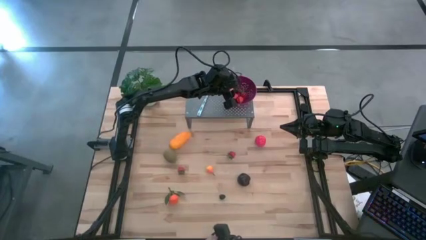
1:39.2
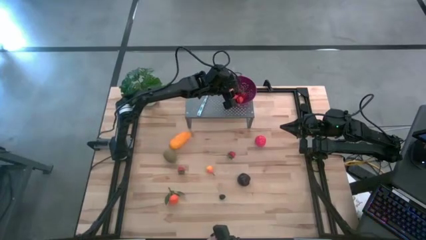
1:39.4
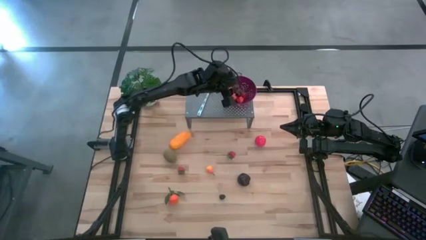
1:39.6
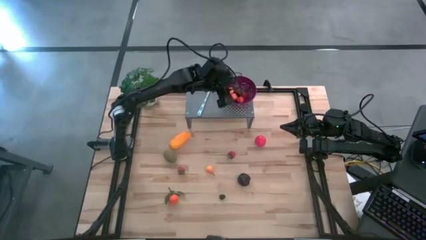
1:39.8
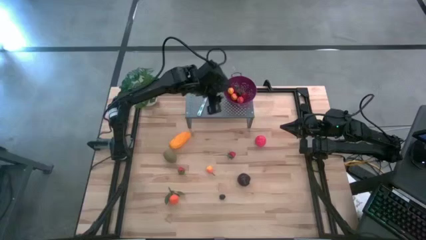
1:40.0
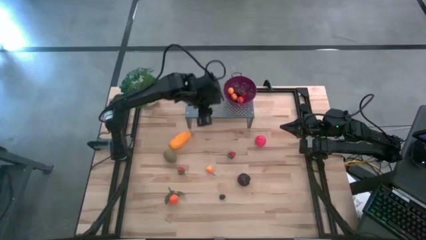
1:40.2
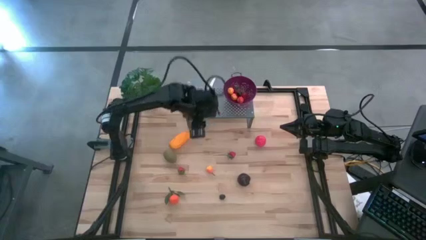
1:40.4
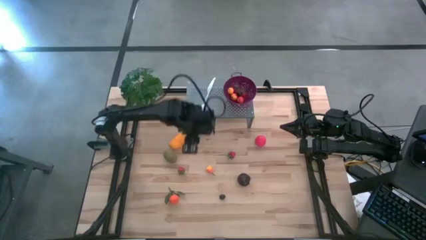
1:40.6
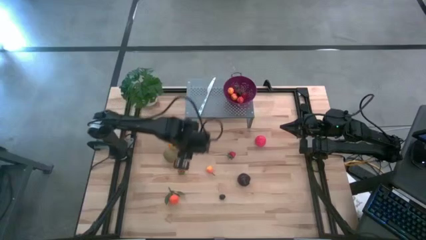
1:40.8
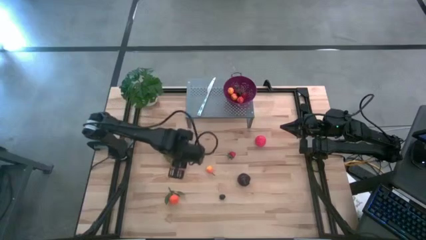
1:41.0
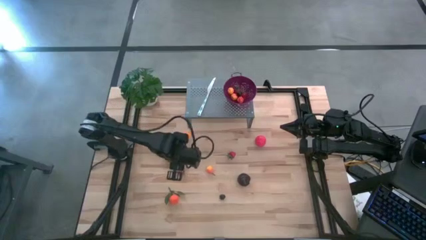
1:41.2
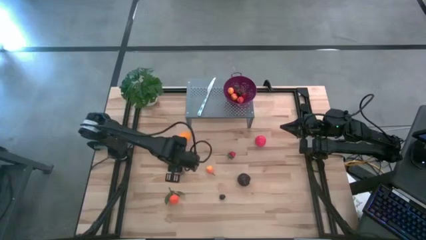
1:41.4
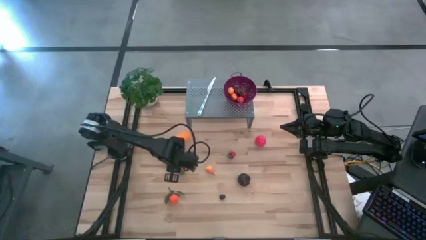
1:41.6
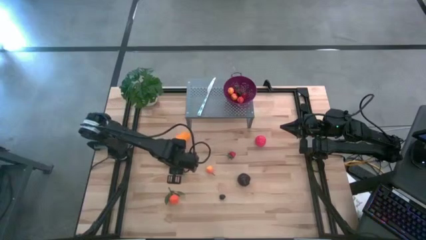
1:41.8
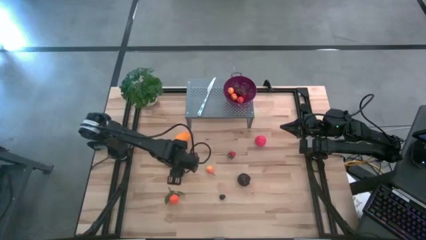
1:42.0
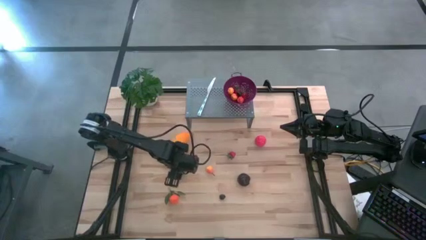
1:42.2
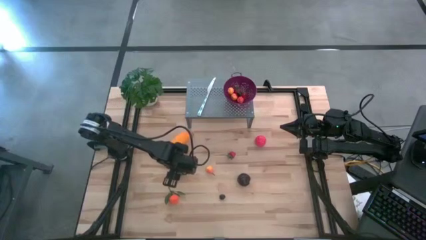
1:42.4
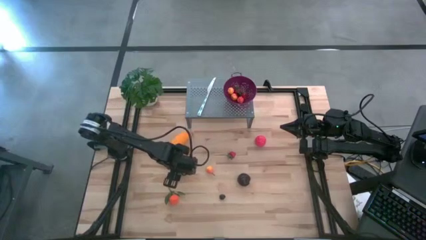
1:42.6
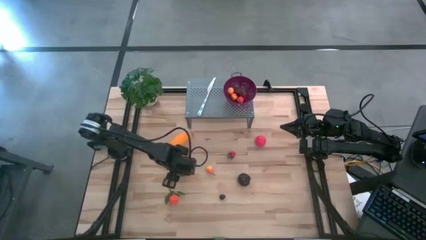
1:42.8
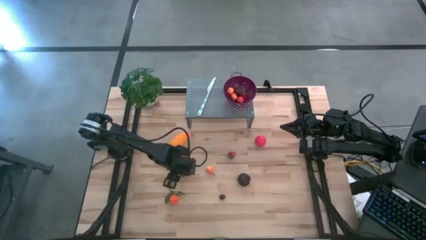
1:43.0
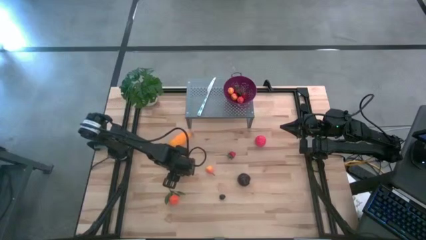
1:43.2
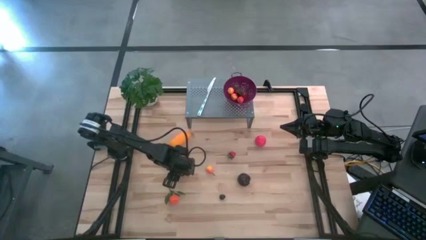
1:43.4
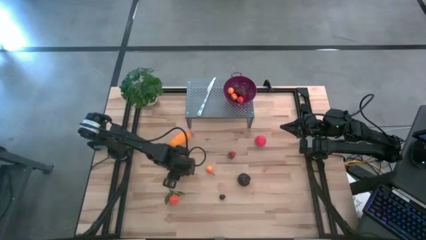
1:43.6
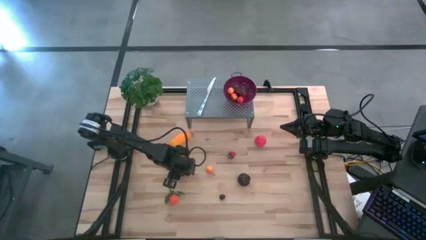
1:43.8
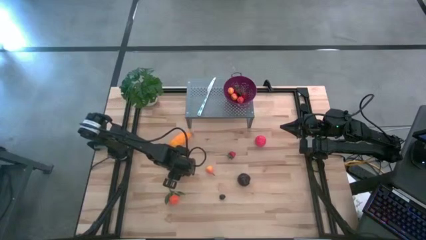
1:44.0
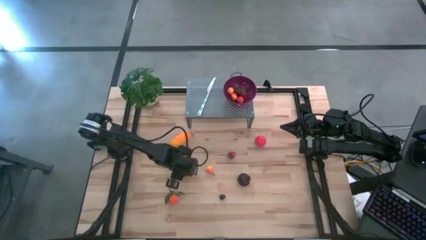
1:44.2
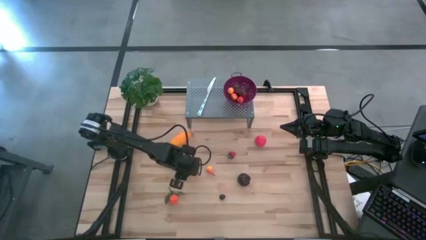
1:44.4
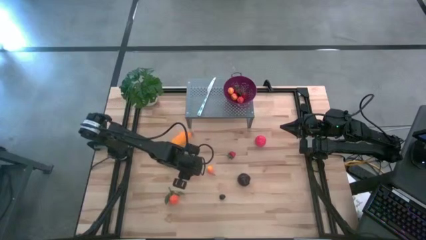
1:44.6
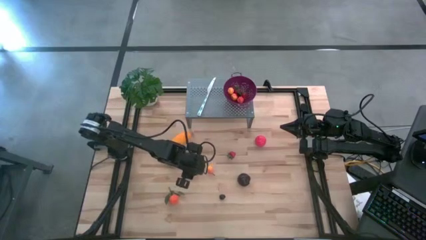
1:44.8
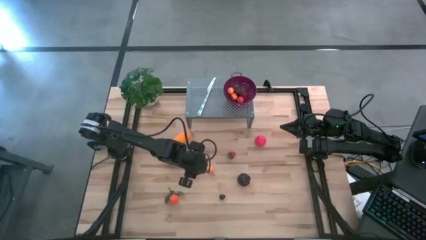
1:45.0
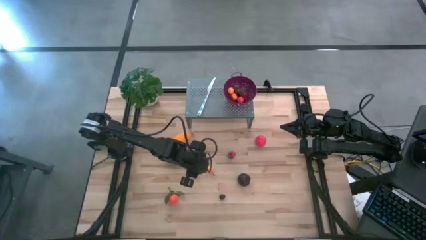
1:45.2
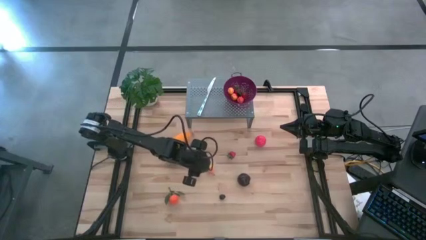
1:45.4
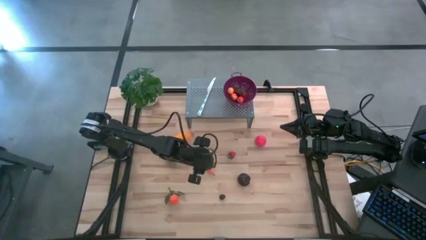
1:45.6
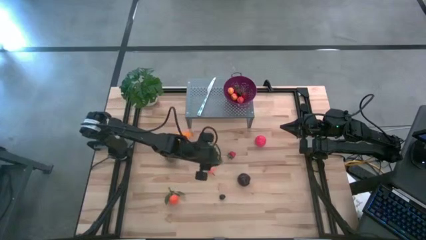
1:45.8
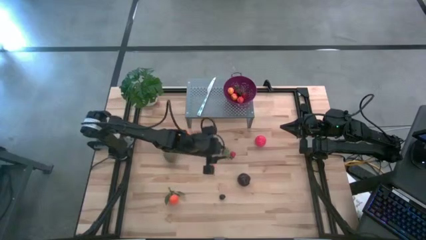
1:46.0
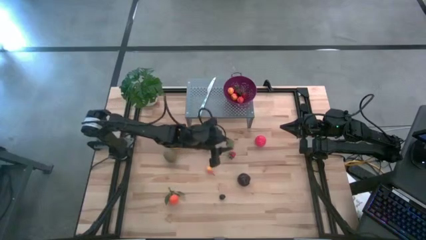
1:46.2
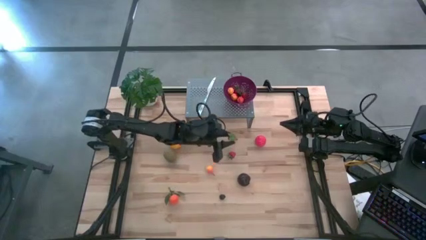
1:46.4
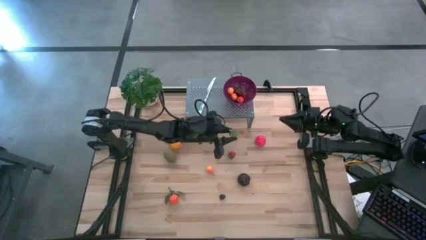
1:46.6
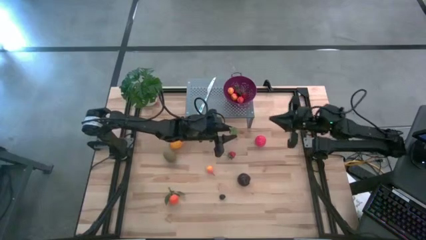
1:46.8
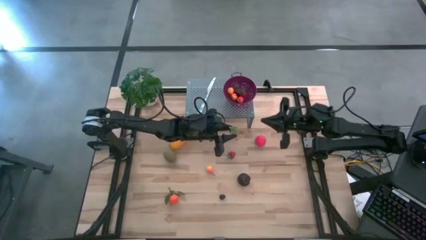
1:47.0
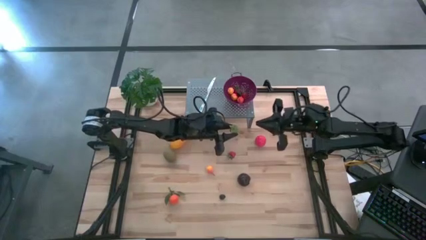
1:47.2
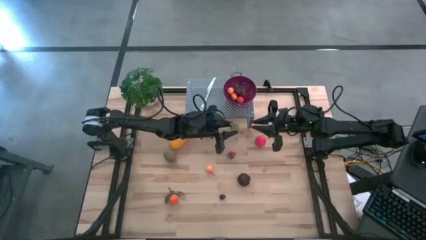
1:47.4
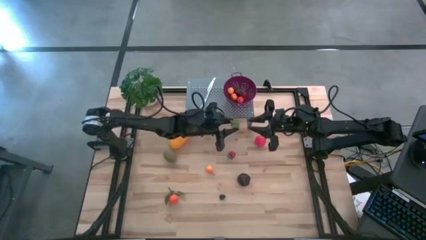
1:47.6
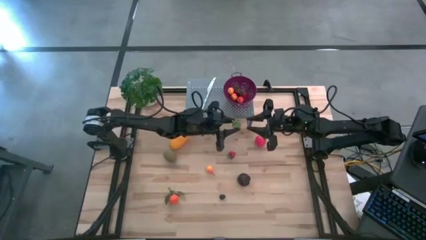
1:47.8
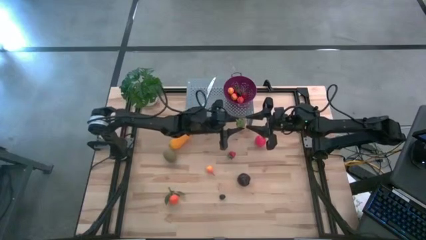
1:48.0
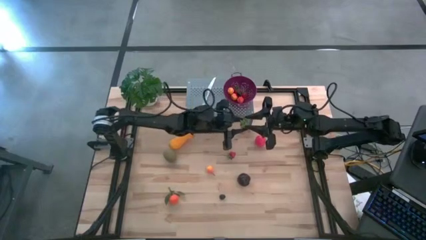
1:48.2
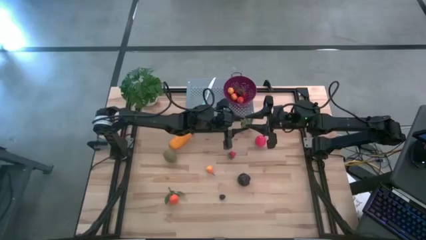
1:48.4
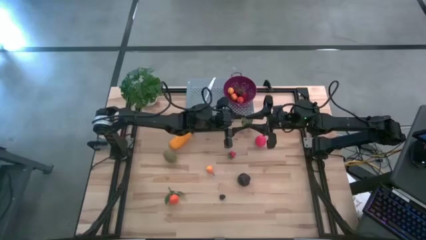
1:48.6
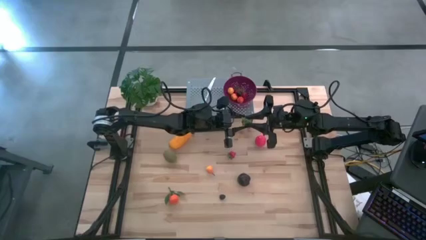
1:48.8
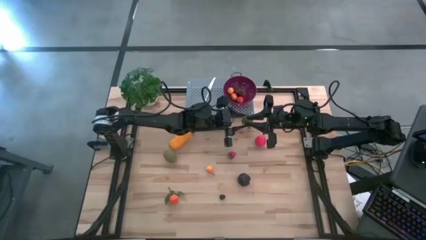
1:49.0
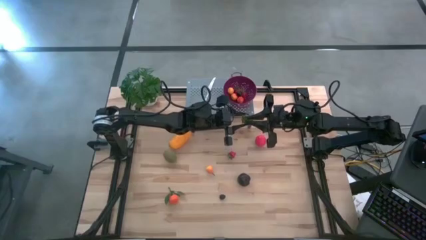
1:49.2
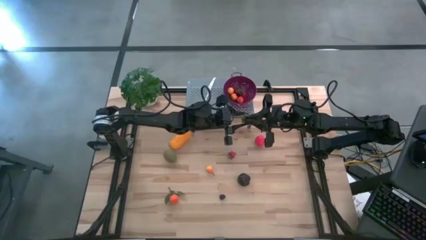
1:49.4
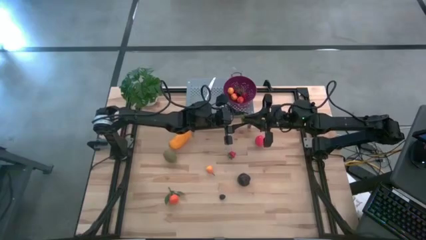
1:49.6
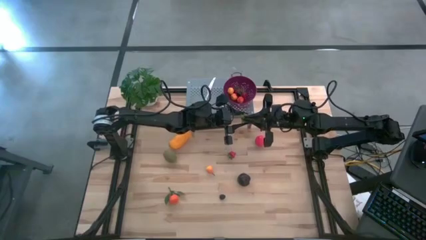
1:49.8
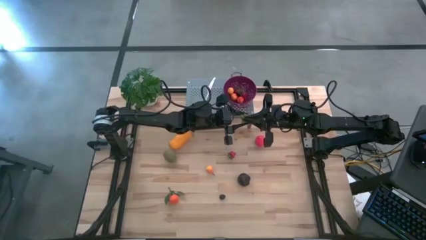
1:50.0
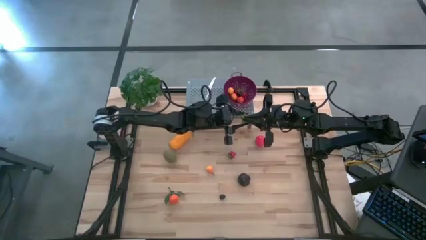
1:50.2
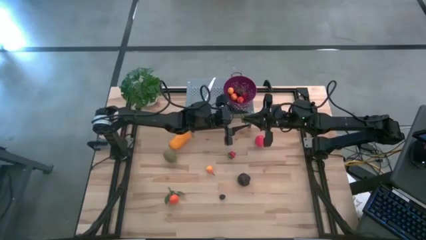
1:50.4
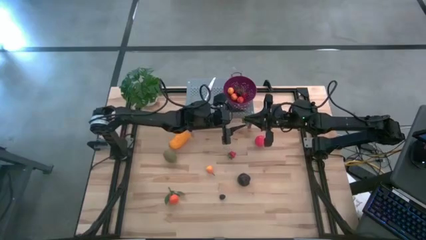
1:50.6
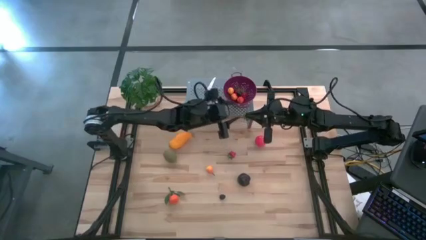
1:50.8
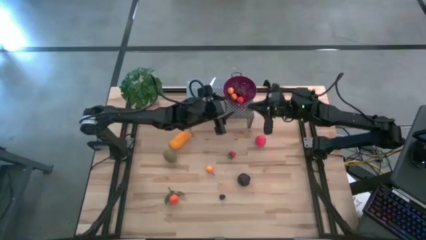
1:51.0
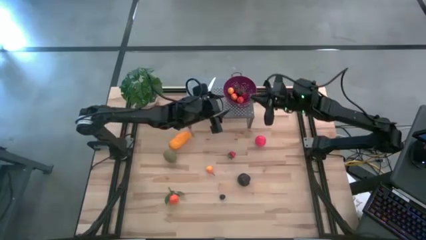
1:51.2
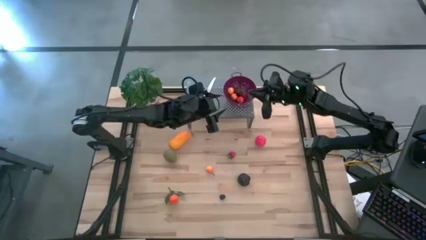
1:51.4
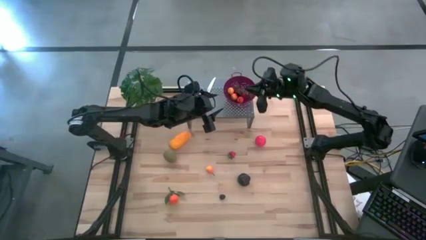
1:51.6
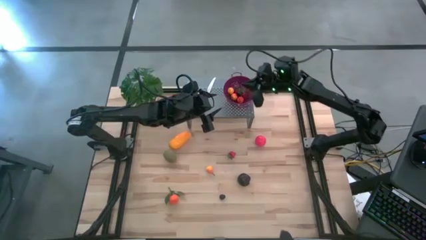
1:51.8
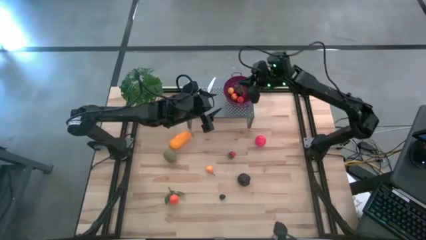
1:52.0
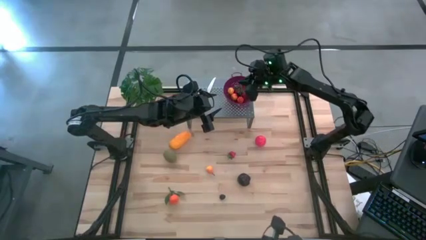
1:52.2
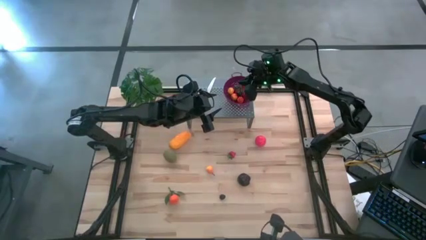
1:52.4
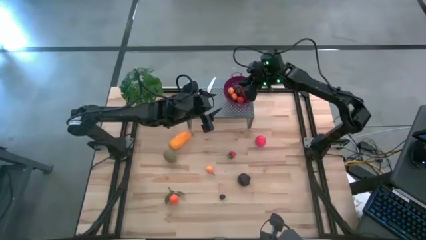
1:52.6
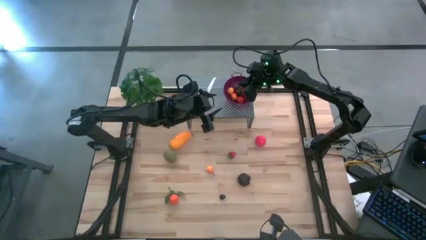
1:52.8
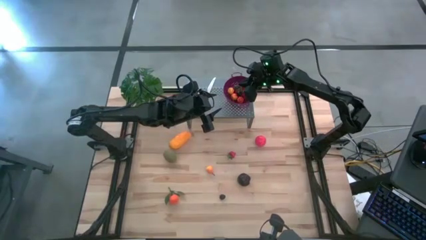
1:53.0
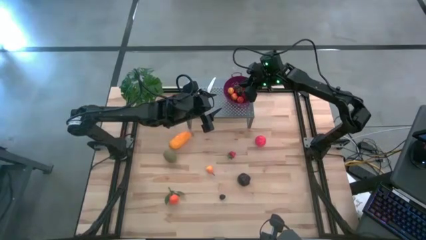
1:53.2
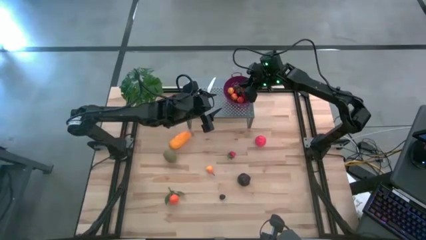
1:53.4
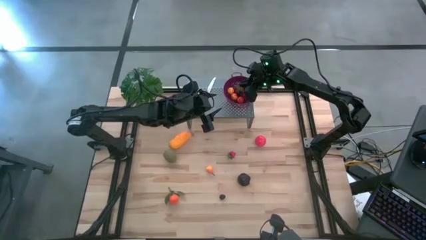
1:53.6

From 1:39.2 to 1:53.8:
Task: Pick & Place Fruit
Put the red strawberry into the violet strainer bowl on the shelf
